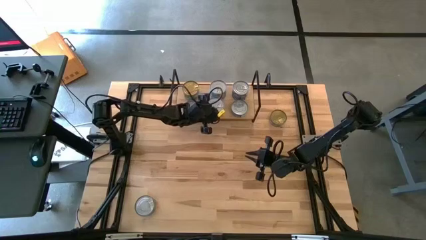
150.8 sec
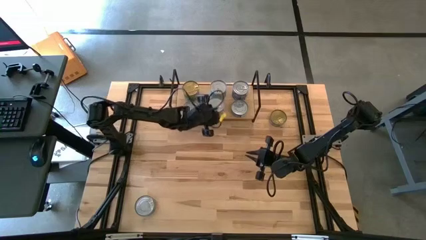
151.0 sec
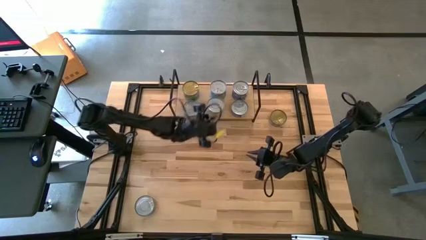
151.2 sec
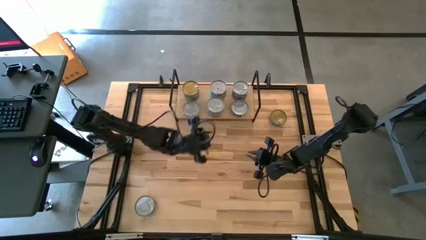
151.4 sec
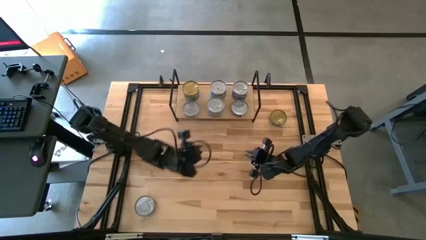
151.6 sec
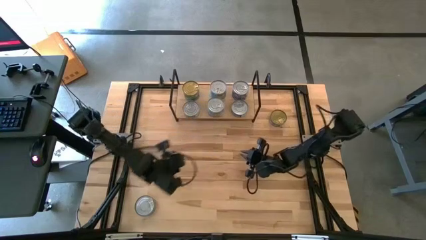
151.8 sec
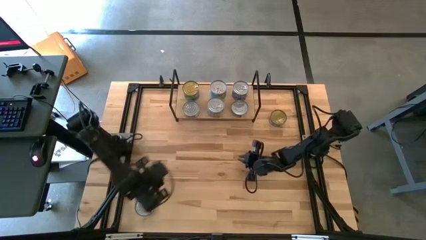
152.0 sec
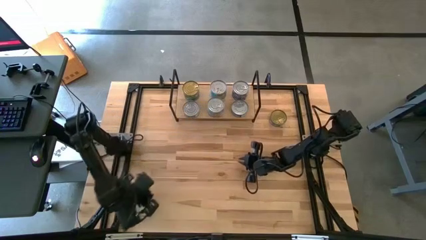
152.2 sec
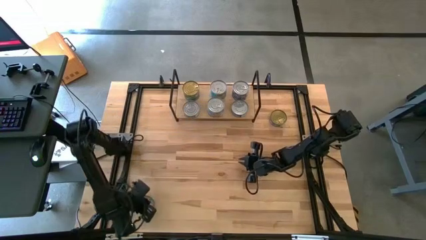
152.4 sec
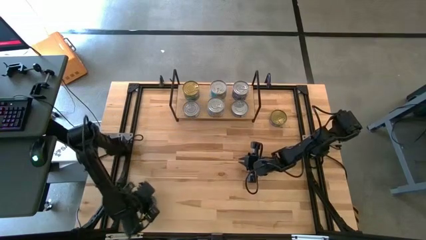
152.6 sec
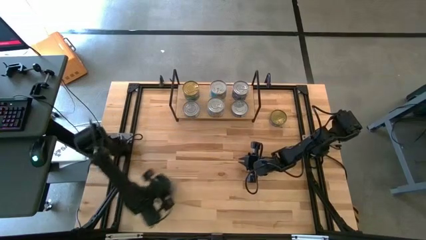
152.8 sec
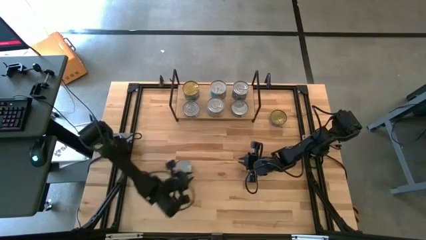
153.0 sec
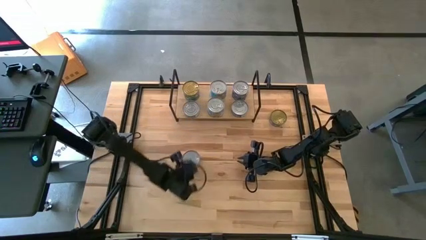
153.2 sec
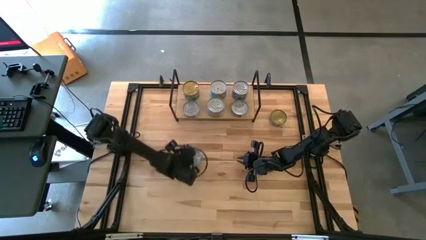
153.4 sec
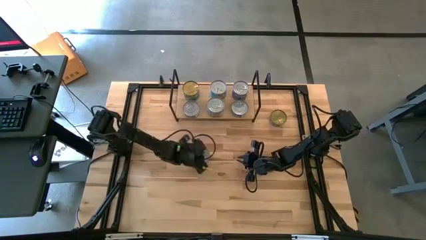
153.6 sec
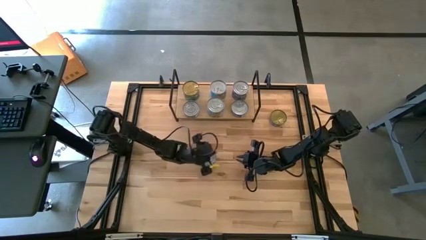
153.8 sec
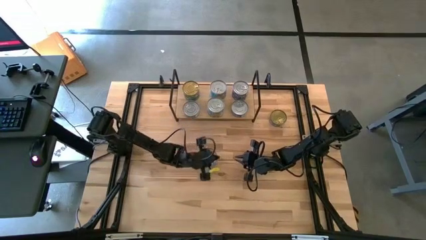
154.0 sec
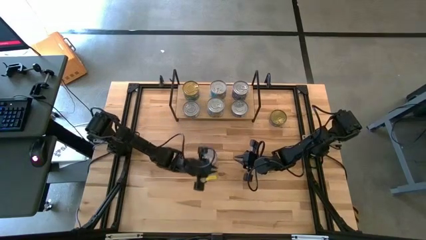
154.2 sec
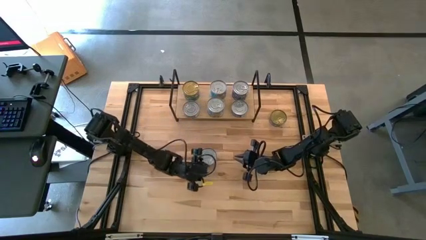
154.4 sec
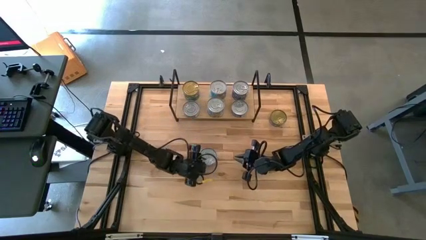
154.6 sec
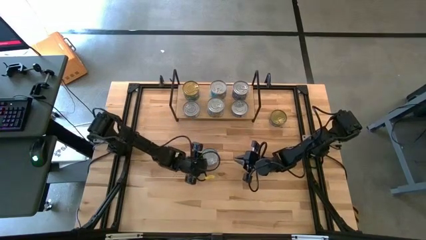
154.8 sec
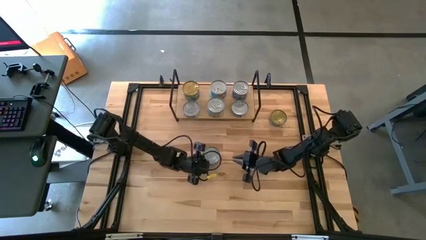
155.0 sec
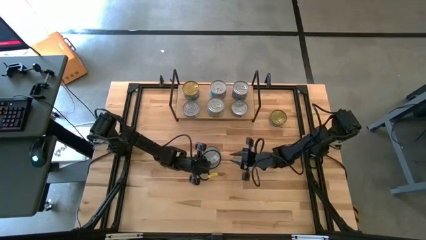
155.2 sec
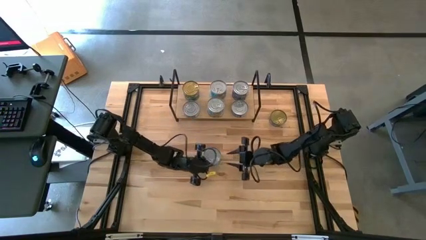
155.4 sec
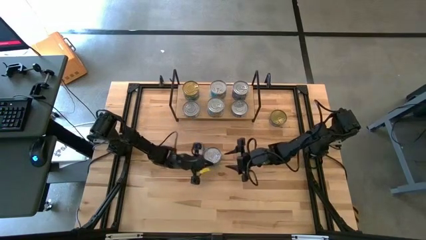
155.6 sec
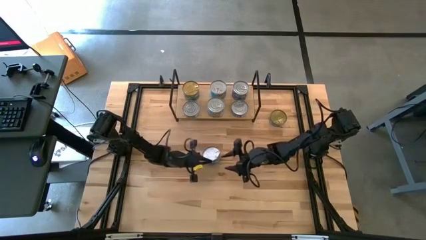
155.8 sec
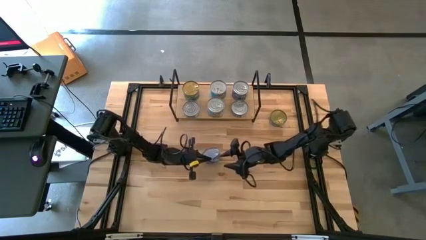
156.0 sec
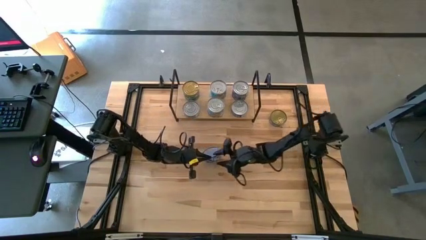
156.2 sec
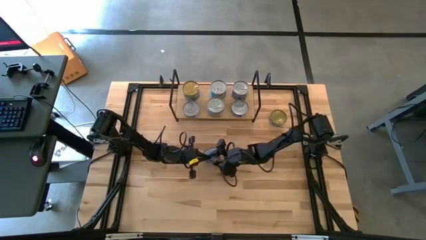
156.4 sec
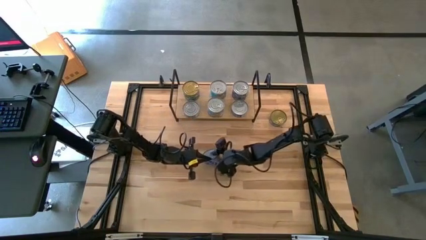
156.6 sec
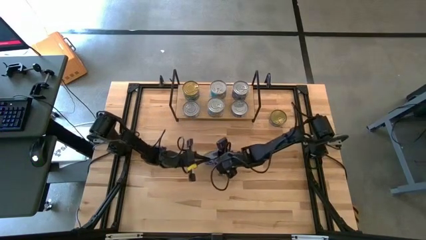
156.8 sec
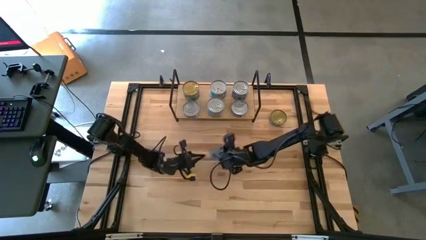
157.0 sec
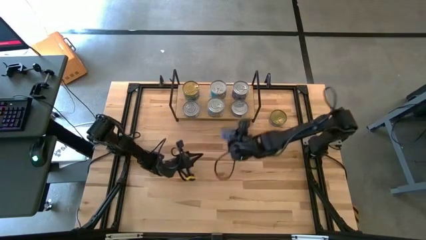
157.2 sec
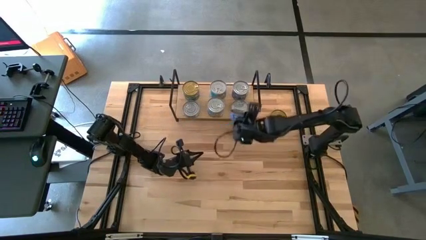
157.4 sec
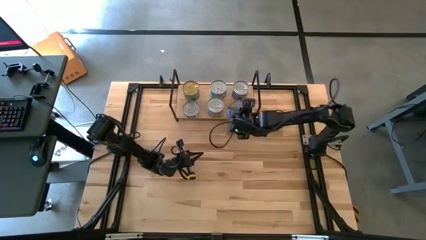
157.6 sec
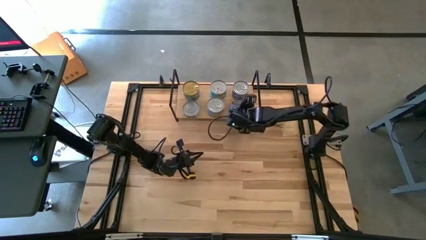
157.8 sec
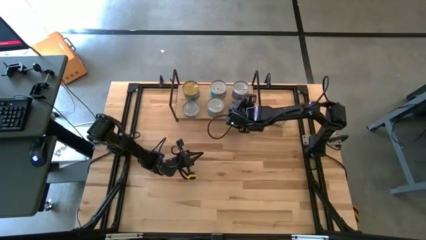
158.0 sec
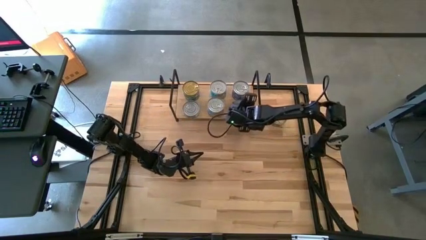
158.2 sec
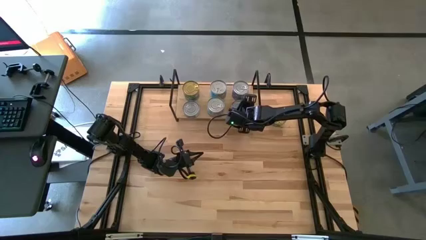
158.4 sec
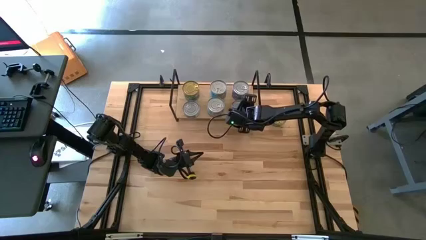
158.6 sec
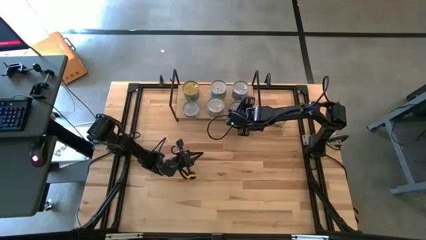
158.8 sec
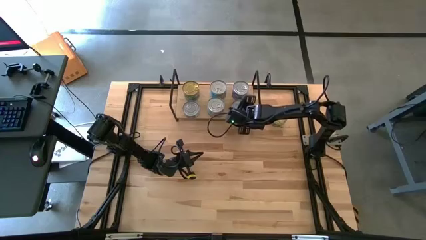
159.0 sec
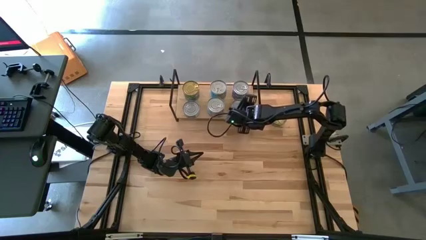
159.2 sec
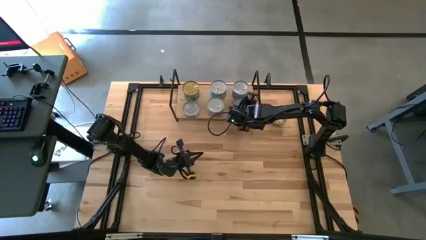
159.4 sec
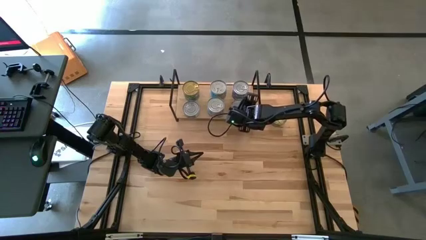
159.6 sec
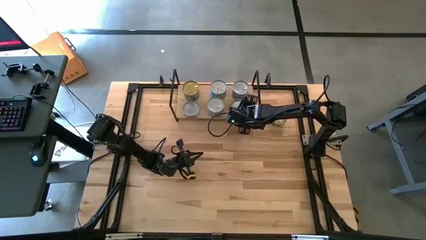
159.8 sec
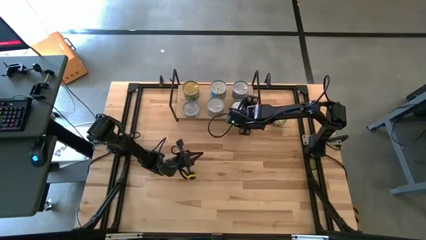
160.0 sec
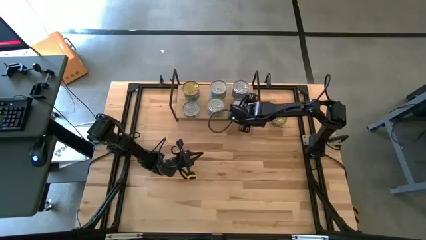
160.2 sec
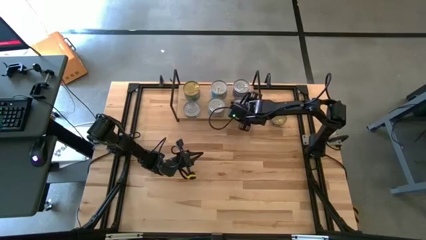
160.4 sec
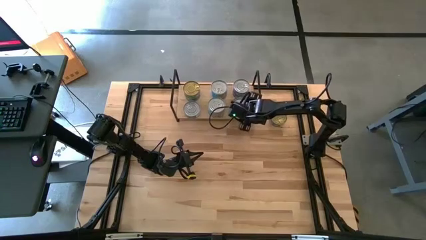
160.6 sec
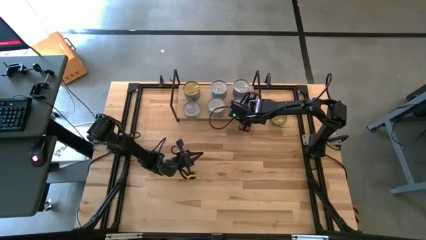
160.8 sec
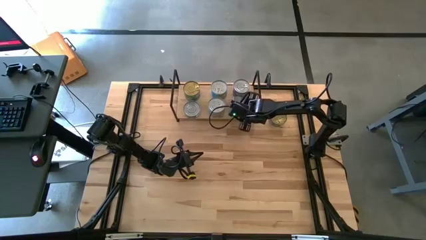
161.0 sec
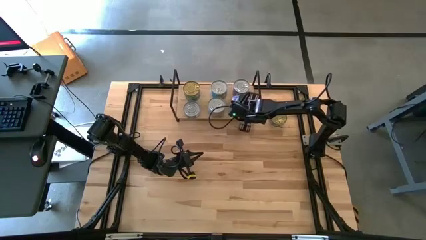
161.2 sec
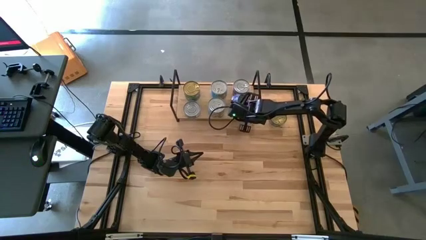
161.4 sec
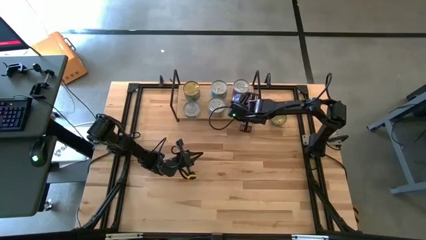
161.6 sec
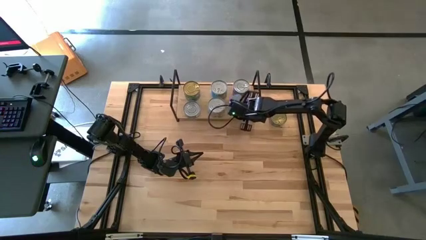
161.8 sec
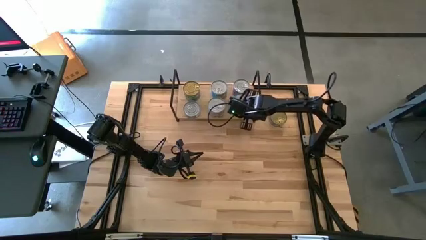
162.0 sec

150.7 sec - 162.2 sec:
Task: Stack canned seafood by type on shelf
Stack the blue tuna can on top of the blue tuna can on the shelf

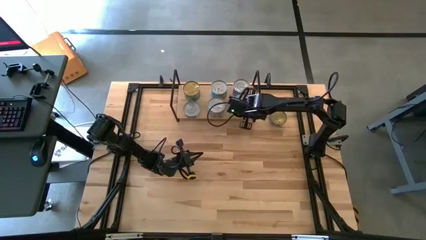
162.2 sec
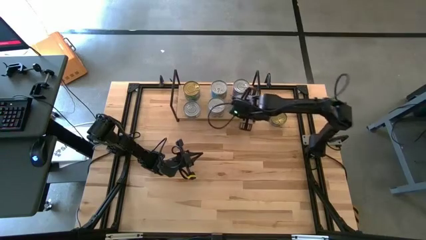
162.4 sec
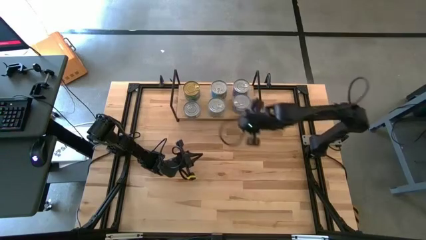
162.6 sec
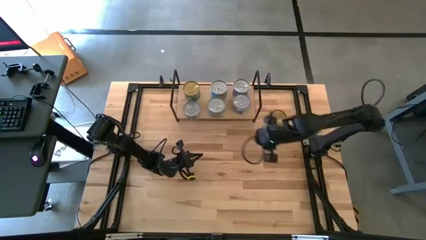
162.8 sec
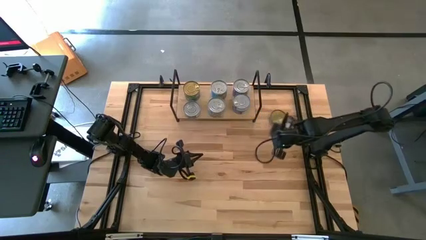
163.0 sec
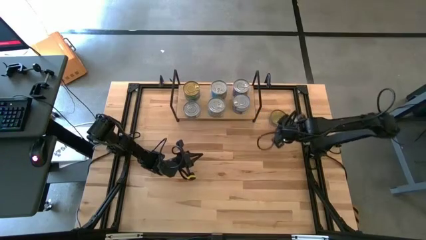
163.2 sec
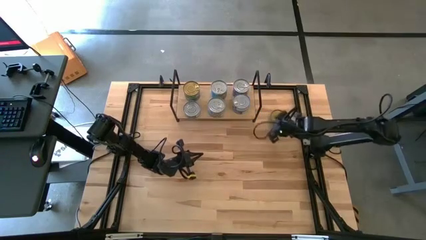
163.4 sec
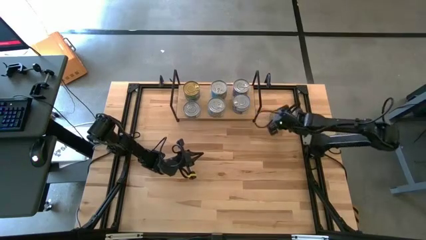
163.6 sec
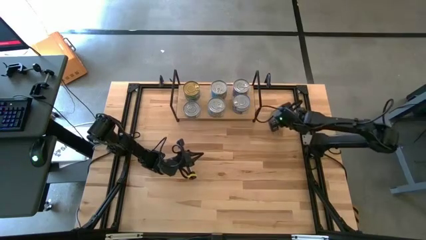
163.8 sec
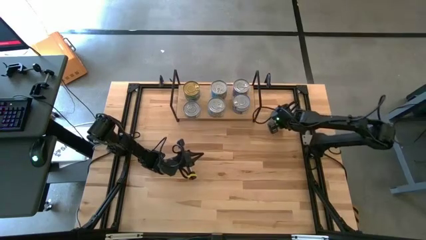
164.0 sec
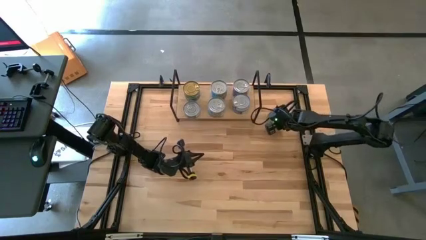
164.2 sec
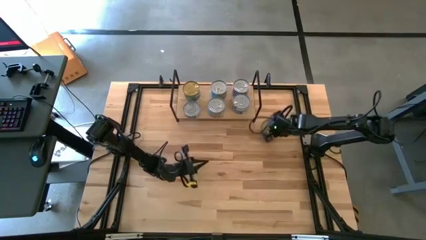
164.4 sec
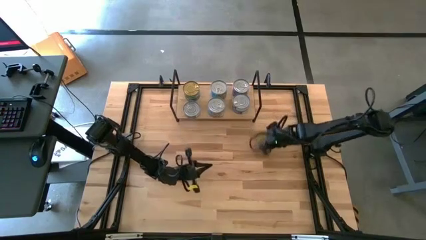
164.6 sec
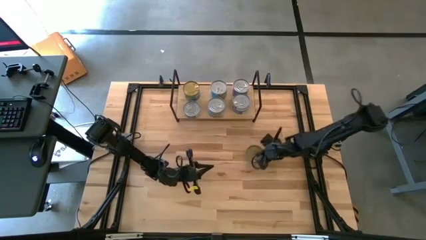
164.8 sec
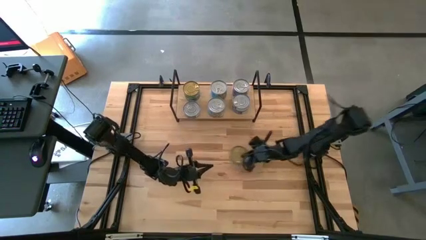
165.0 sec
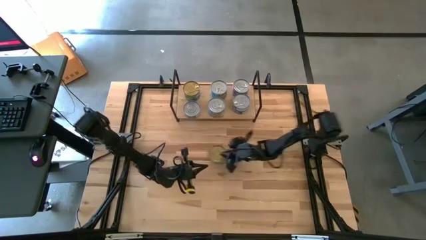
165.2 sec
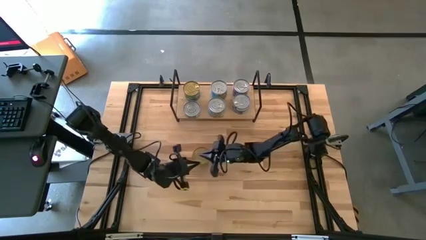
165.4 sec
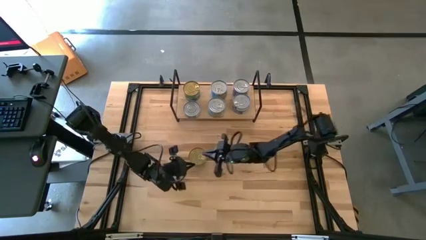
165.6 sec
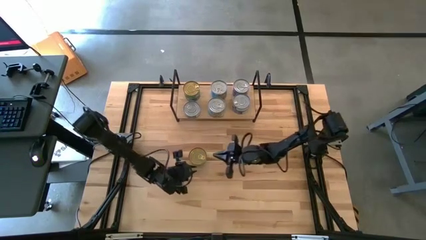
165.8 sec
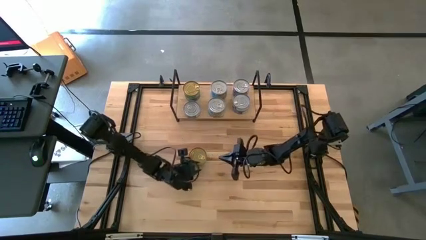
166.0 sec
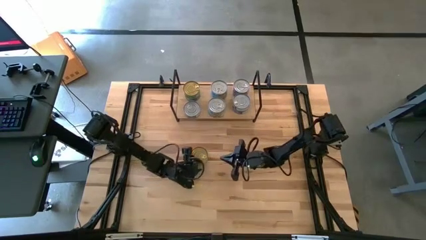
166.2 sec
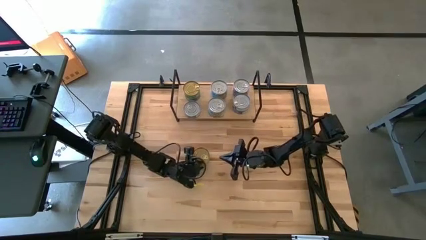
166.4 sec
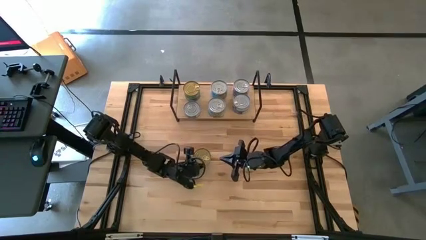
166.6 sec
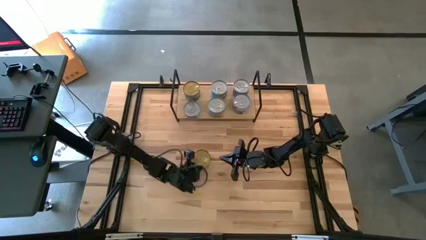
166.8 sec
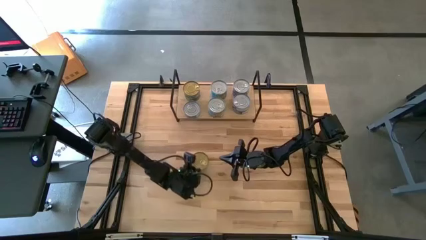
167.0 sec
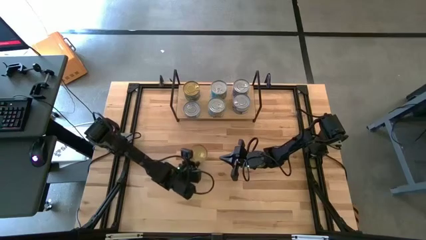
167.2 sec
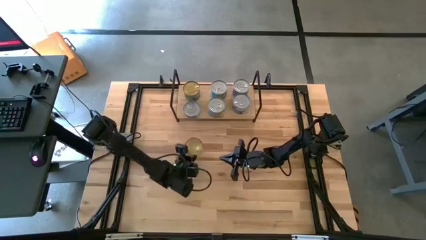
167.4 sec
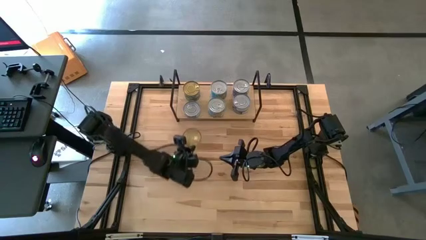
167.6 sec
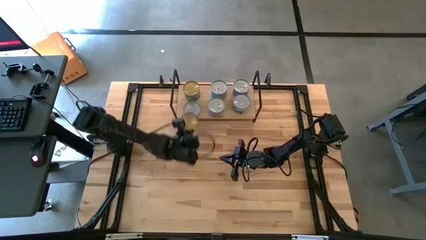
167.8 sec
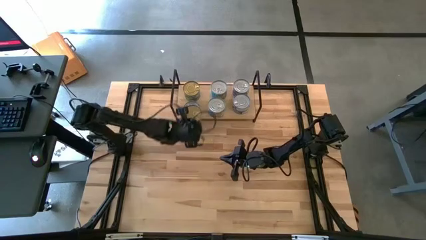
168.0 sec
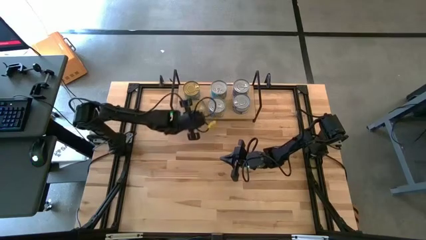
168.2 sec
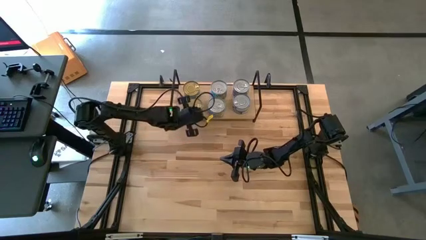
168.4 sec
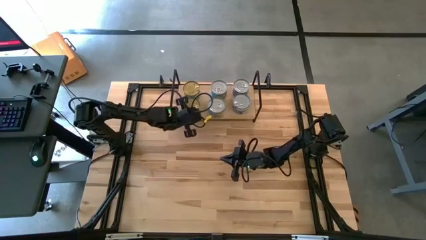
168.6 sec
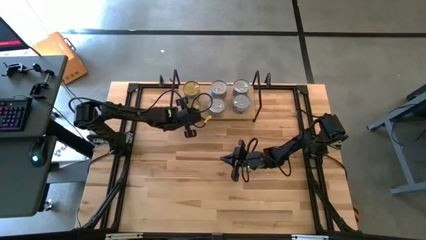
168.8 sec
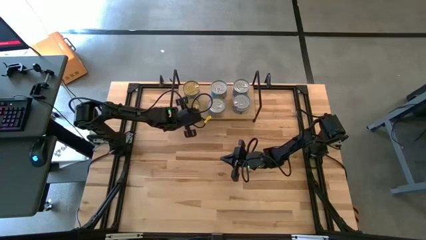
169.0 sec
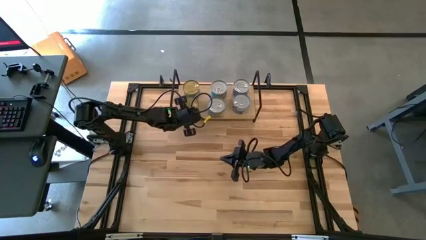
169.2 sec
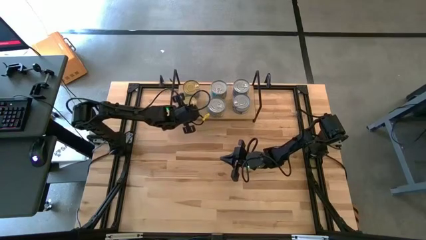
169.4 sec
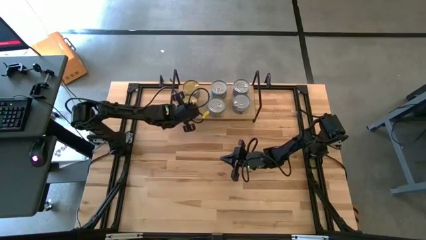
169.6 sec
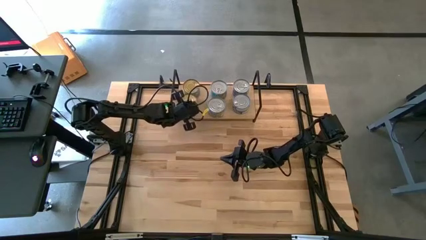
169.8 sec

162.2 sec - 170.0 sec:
Stack the green tuna can on top of the green tuna can on the shelf
